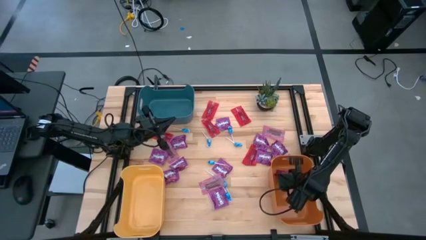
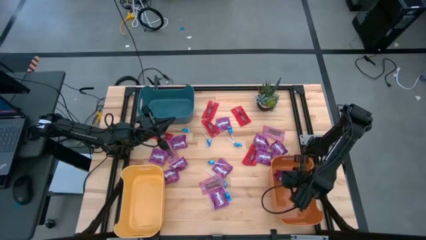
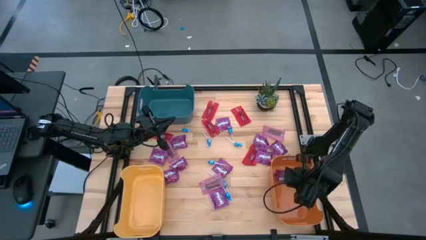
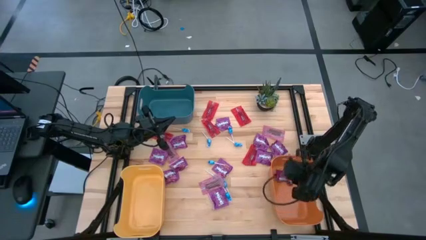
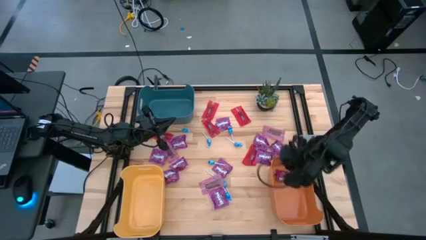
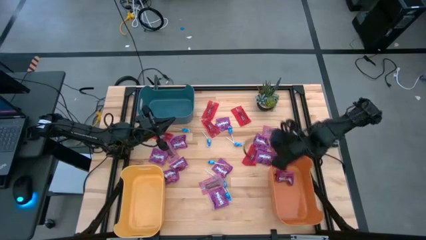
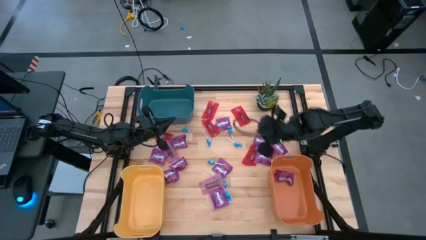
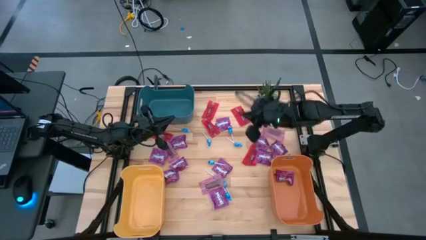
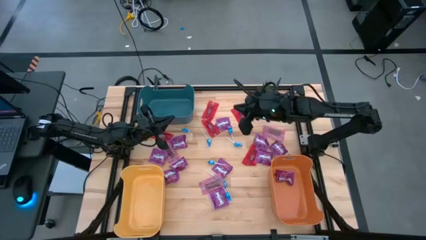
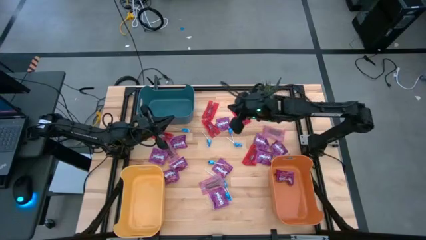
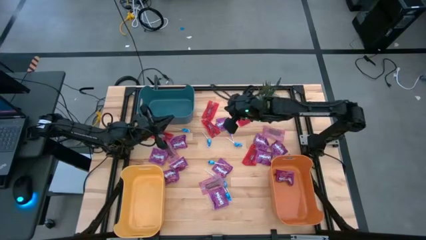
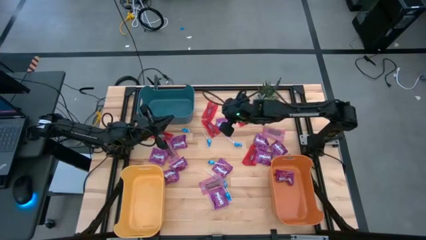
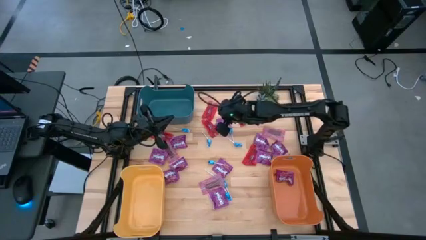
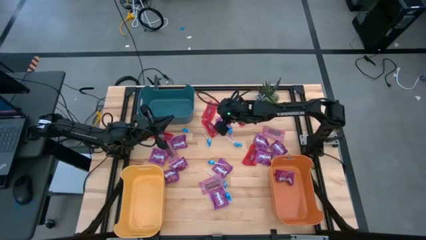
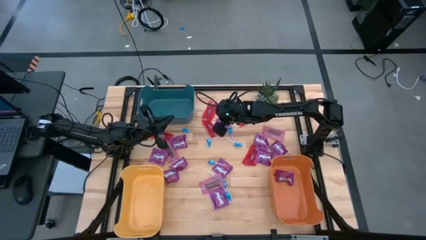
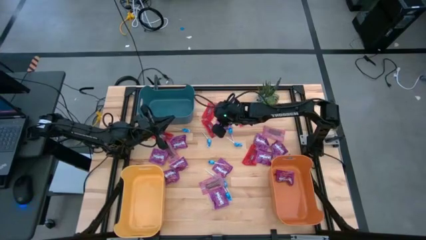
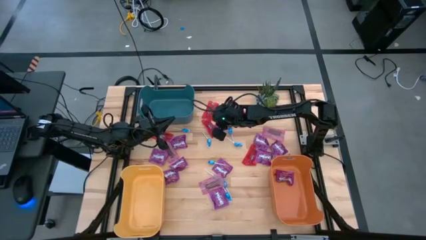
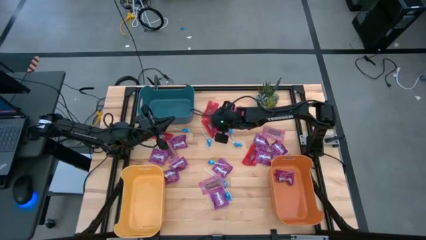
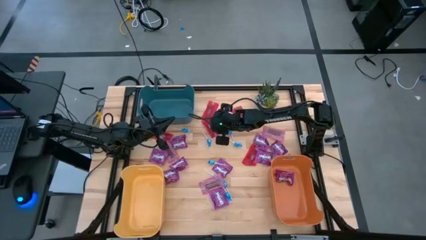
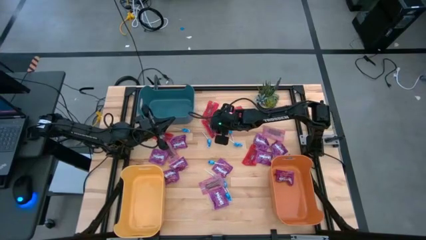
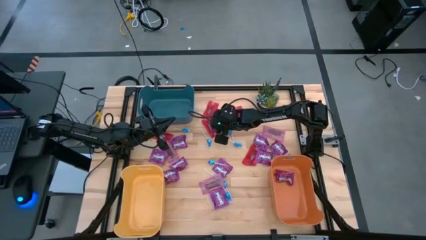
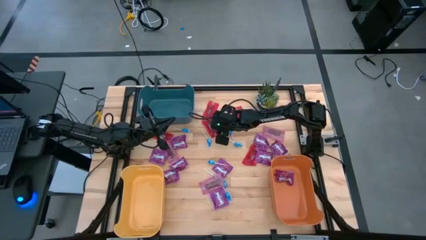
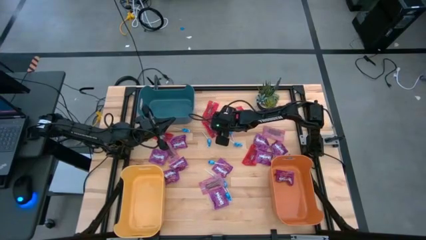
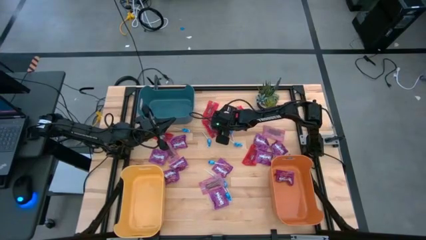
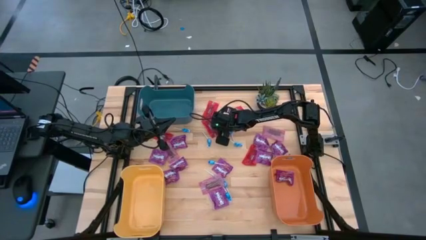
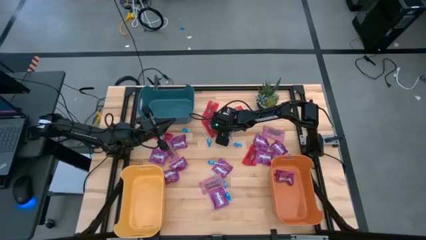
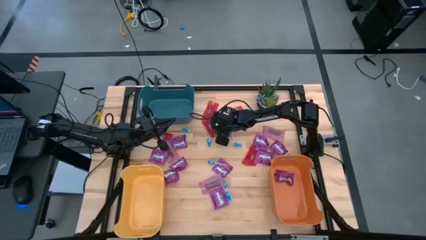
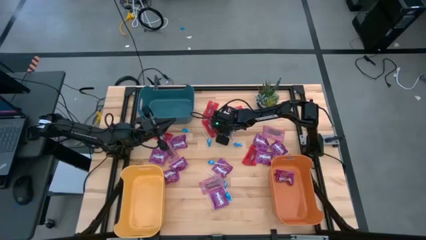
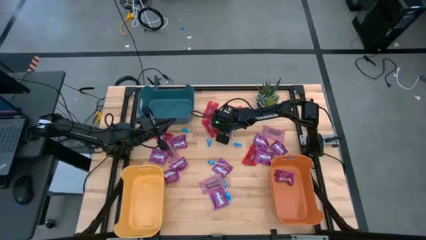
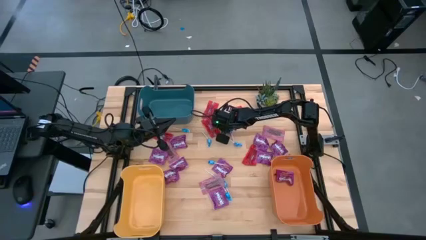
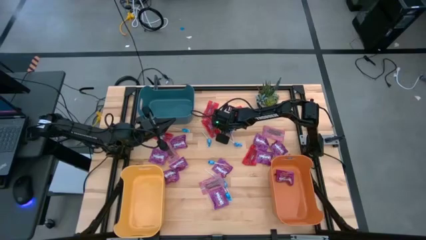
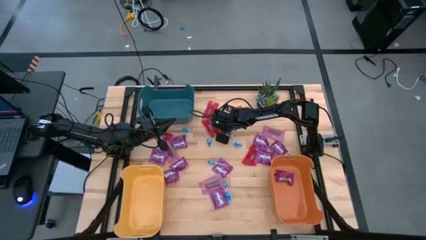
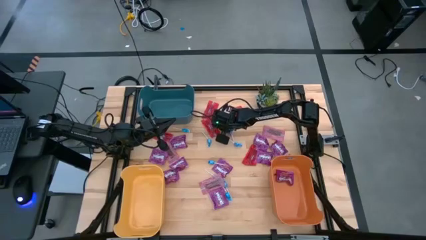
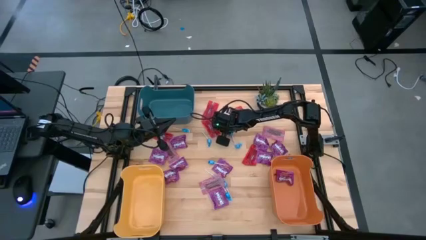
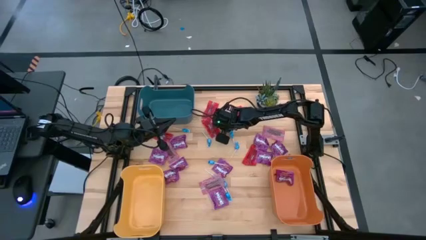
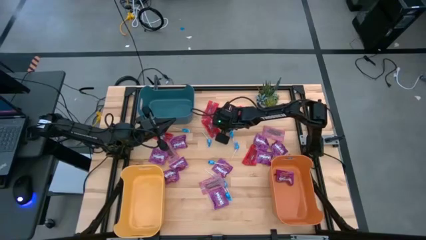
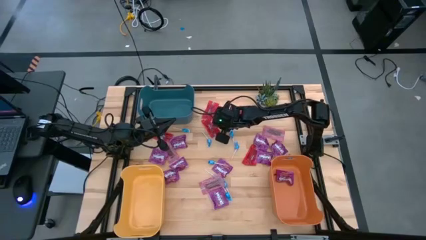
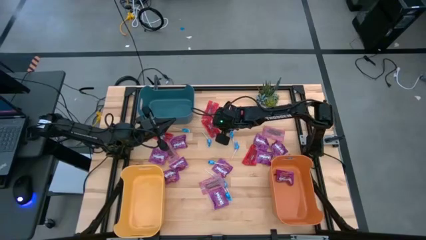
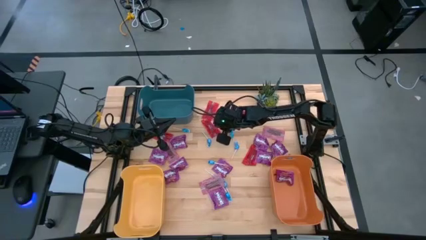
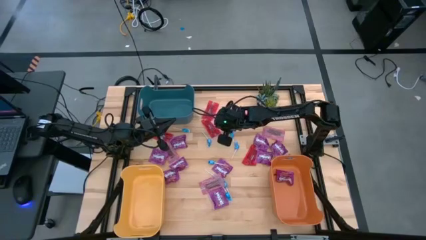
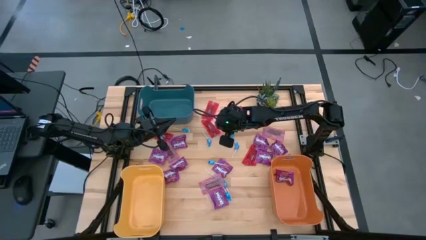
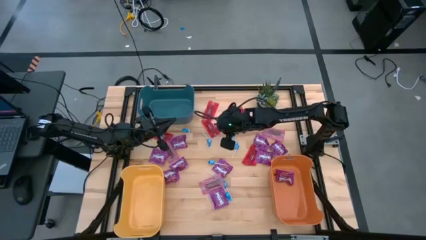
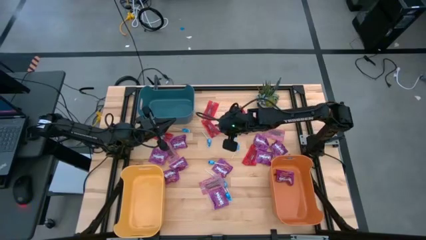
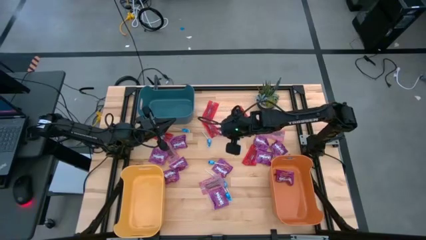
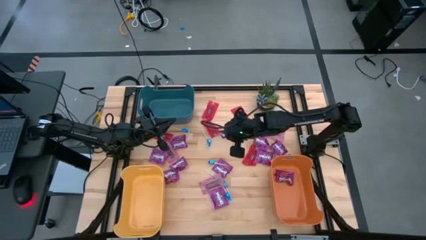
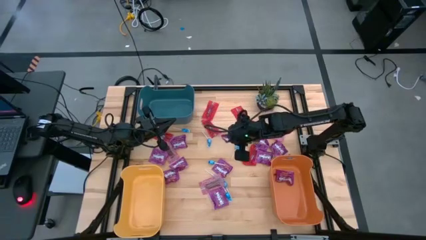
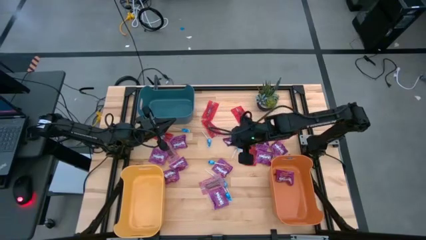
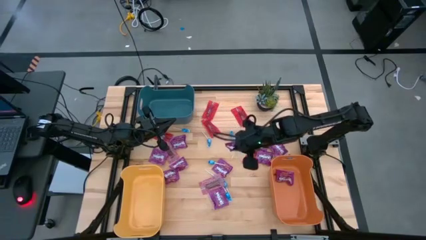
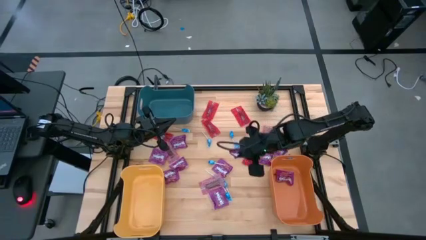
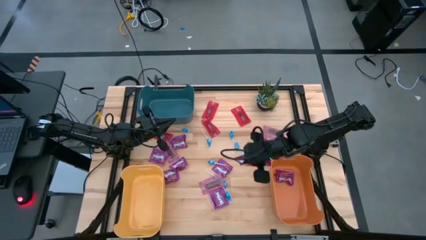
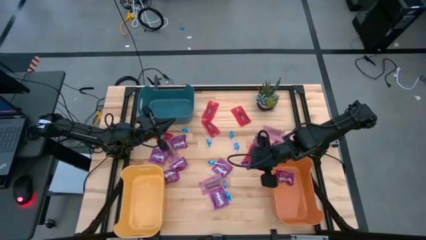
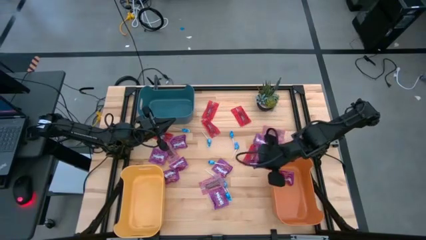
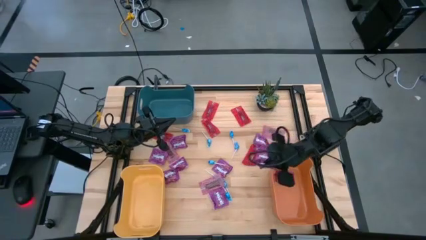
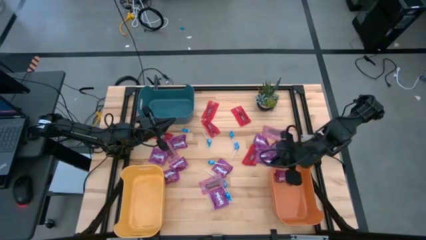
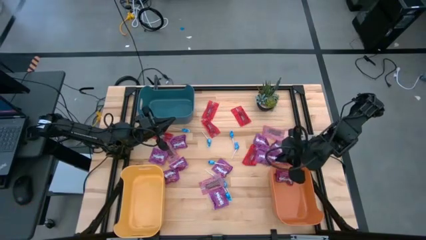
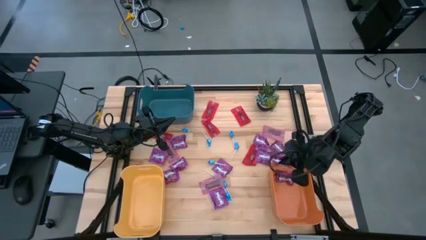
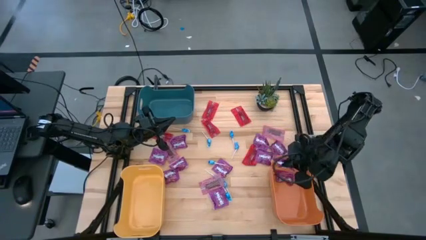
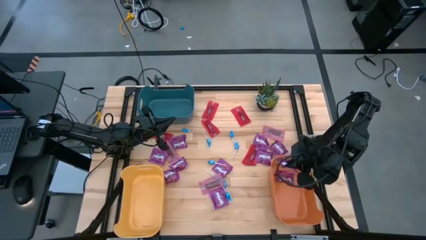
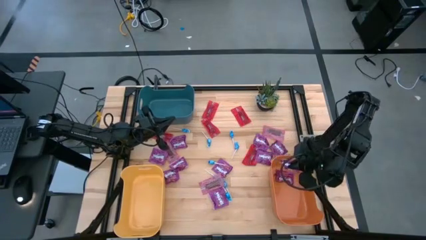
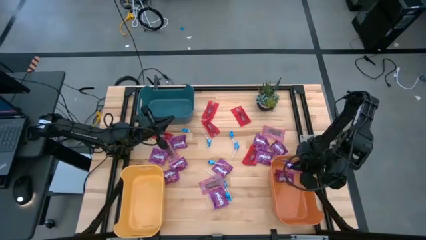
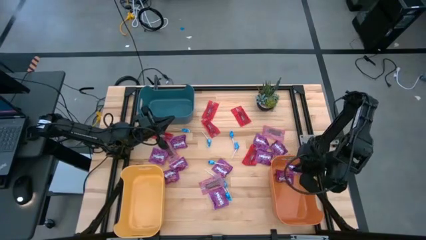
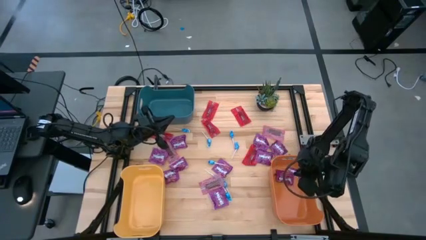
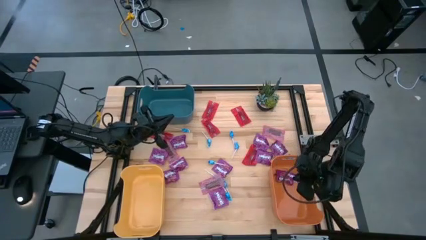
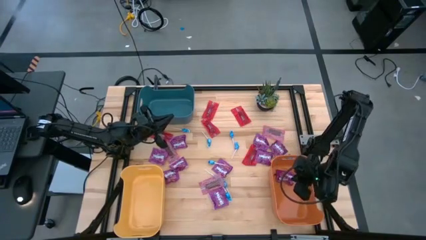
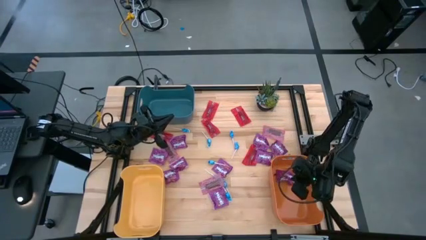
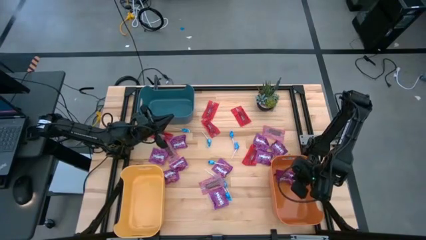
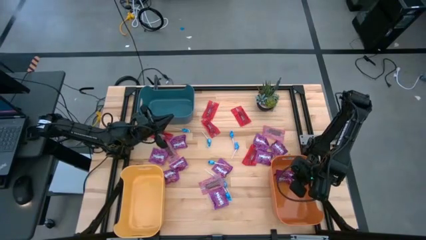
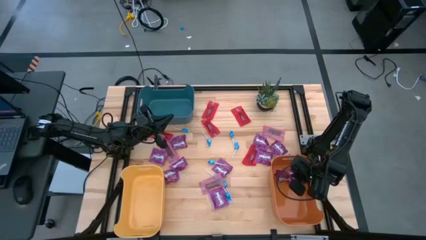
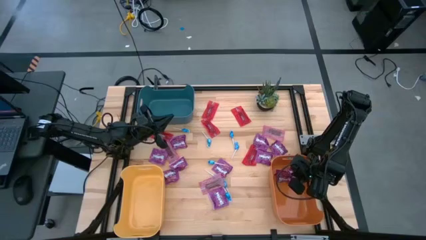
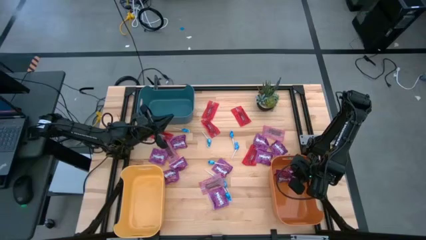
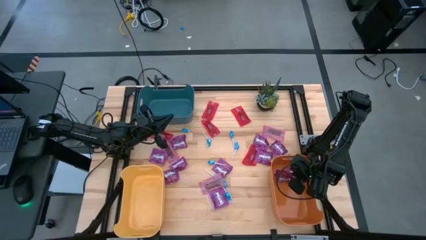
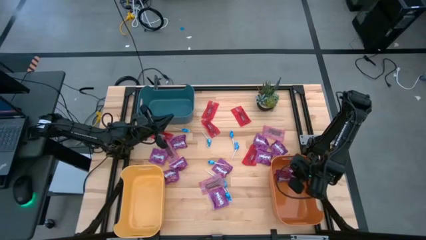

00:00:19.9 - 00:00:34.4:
Task: Sort candy
Put the purple candy into the orange bin

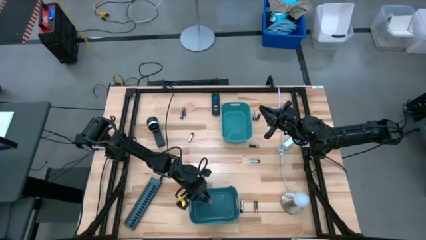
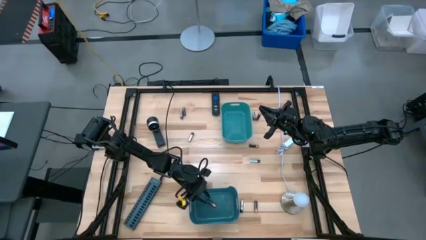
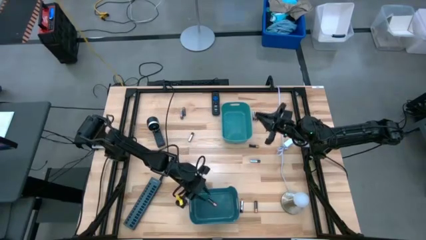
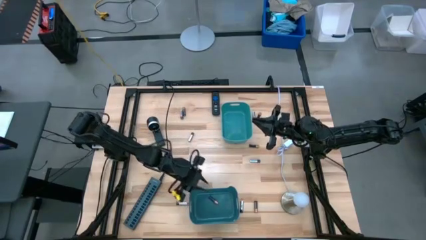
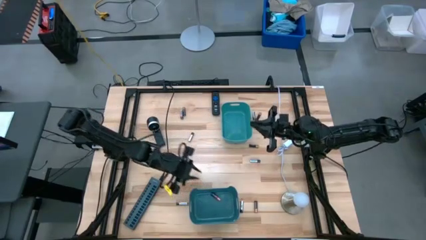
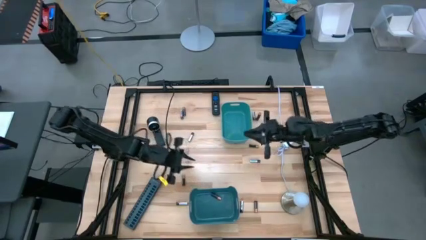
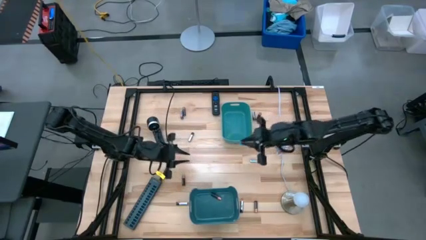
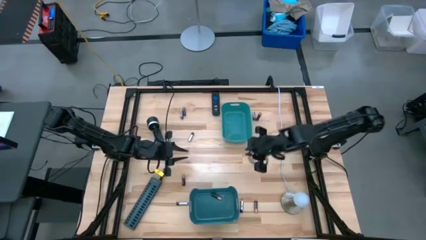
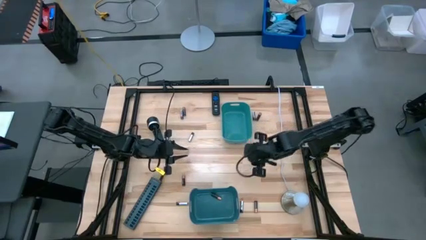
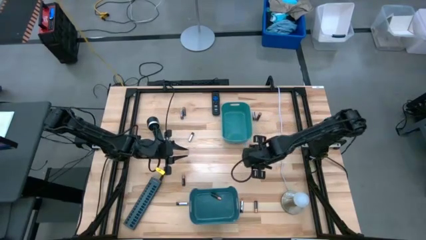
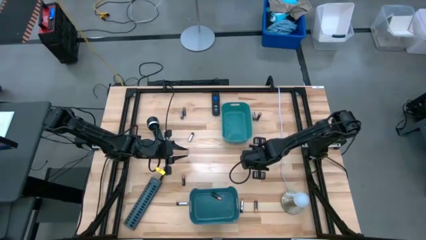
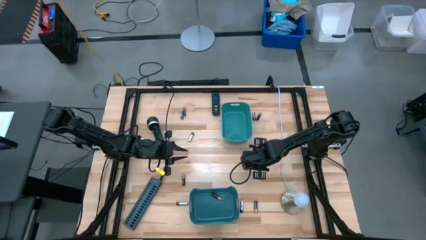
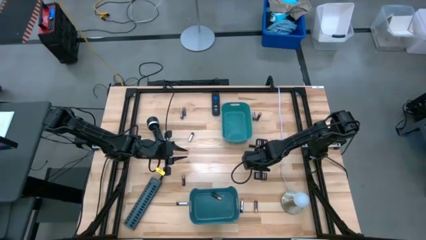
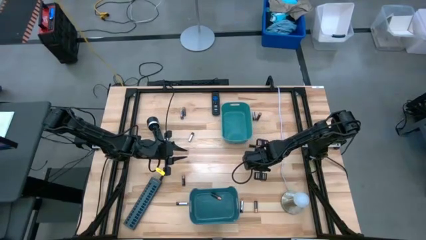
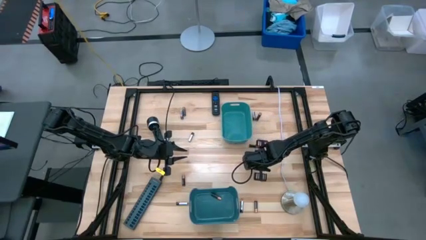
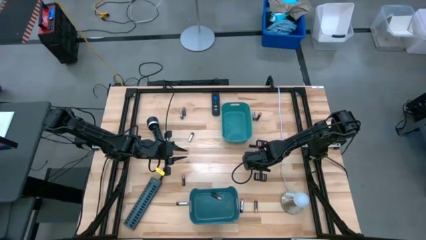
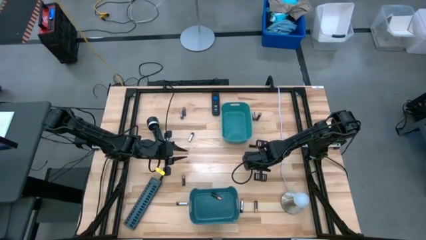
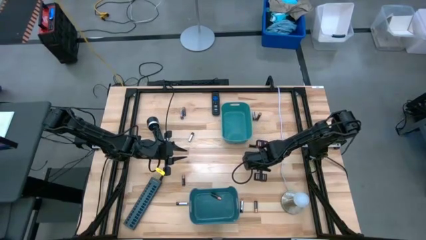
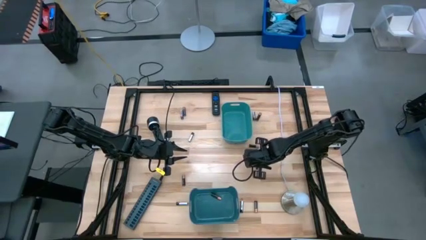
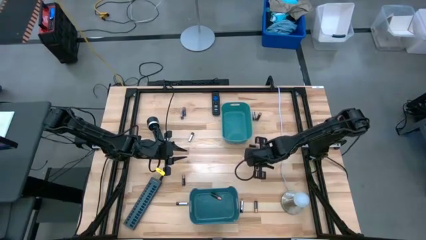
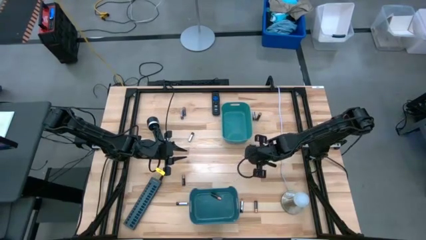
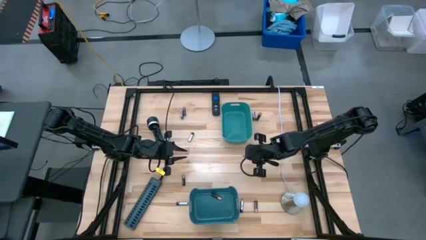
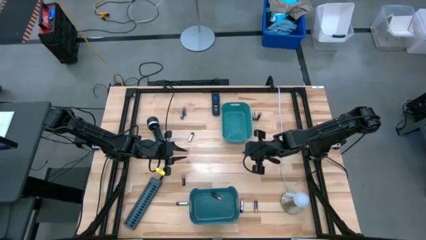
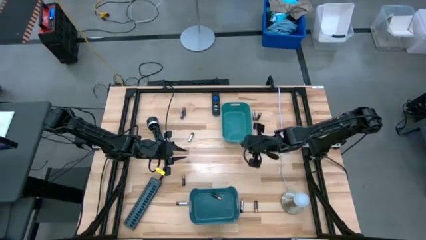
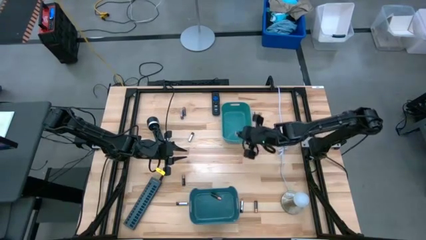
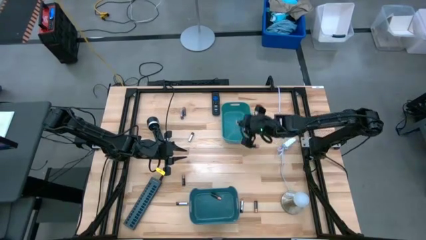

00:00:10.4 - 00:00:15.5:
Task: Sort batteries
Put the silver battery into the light blue bin
